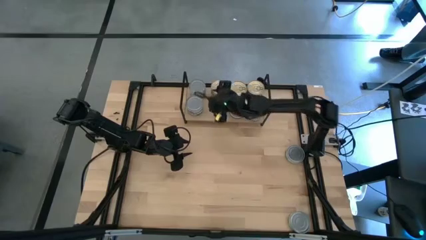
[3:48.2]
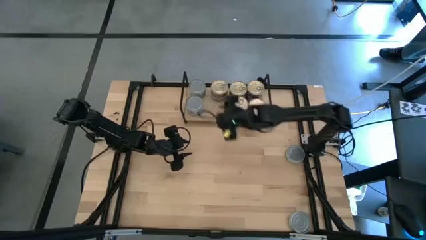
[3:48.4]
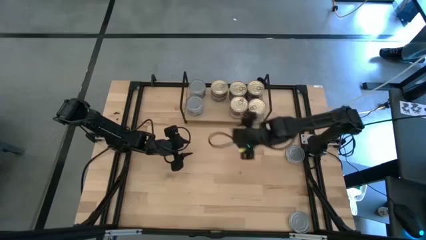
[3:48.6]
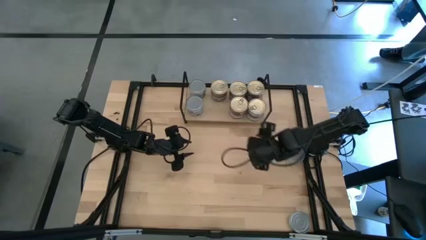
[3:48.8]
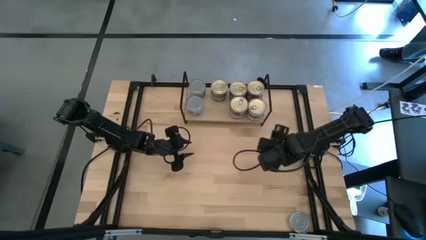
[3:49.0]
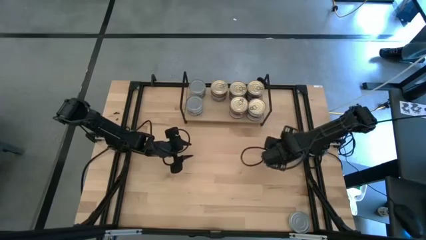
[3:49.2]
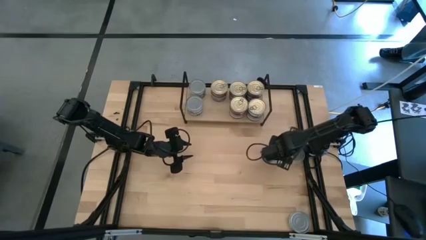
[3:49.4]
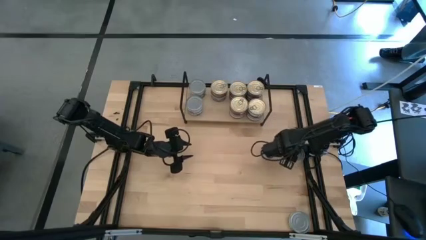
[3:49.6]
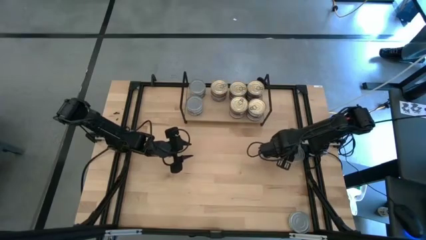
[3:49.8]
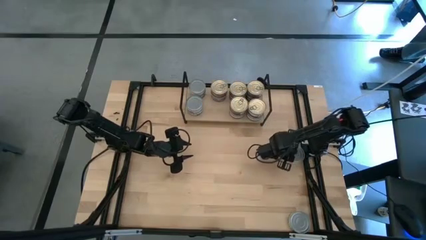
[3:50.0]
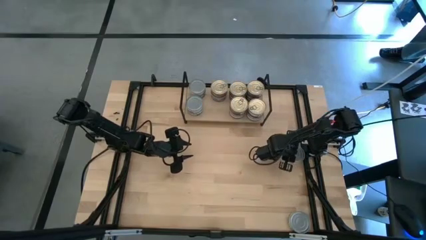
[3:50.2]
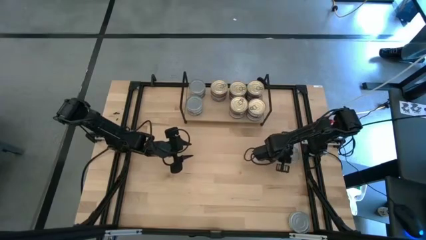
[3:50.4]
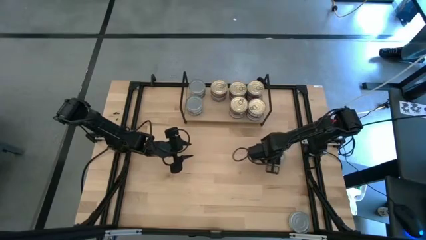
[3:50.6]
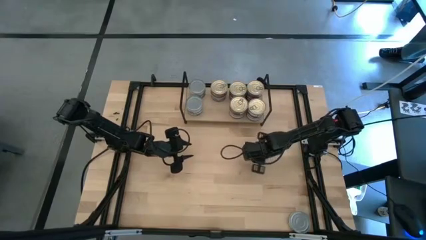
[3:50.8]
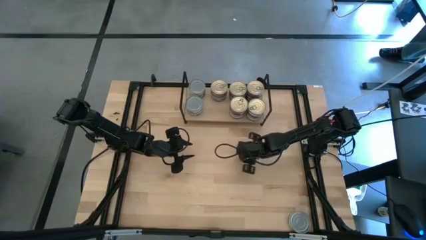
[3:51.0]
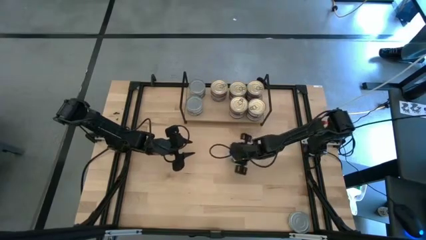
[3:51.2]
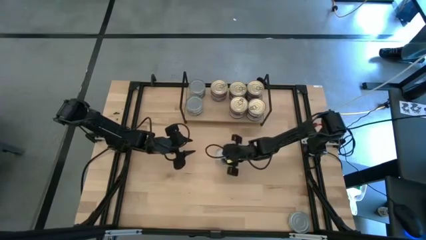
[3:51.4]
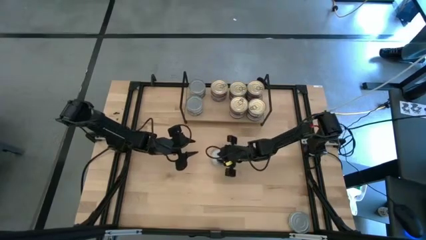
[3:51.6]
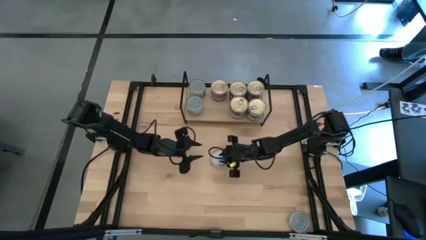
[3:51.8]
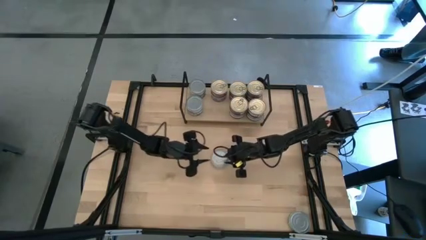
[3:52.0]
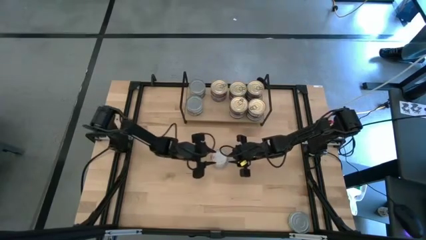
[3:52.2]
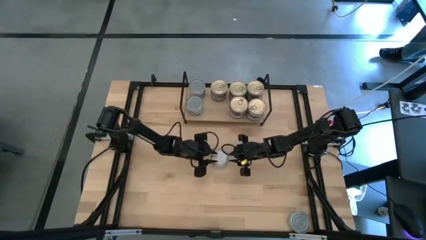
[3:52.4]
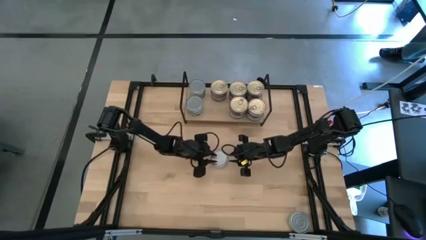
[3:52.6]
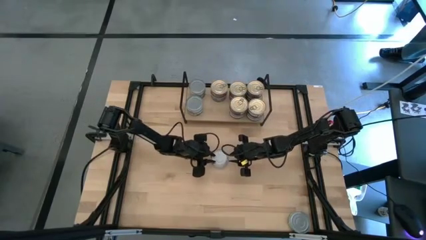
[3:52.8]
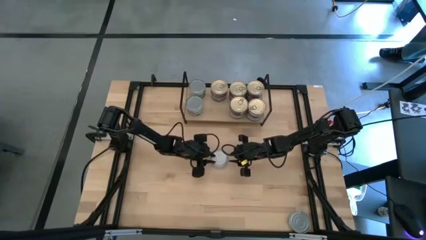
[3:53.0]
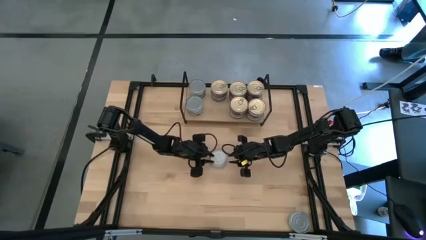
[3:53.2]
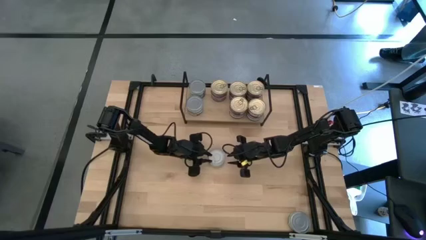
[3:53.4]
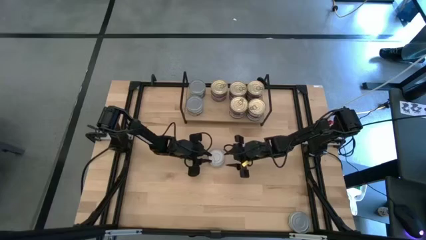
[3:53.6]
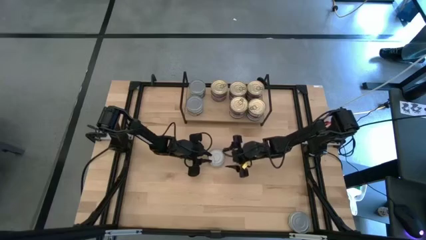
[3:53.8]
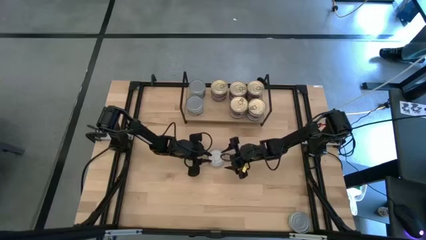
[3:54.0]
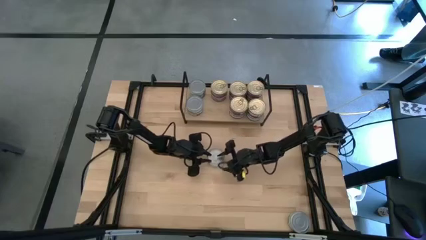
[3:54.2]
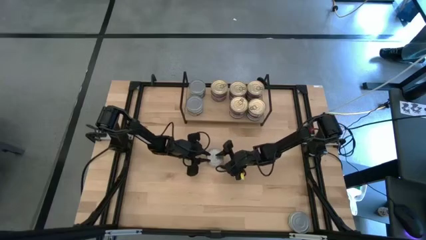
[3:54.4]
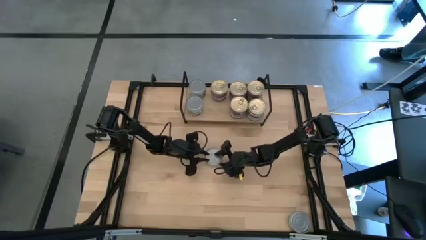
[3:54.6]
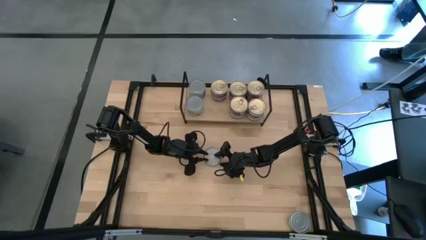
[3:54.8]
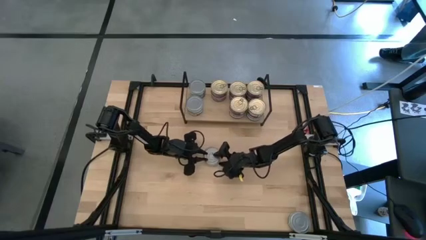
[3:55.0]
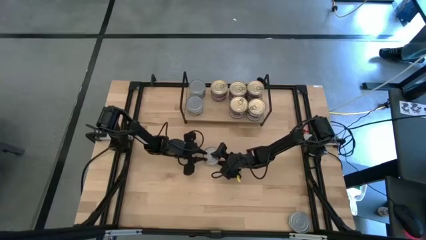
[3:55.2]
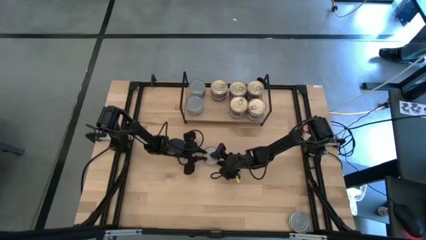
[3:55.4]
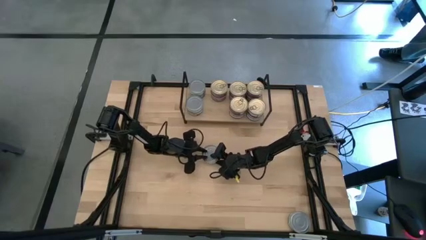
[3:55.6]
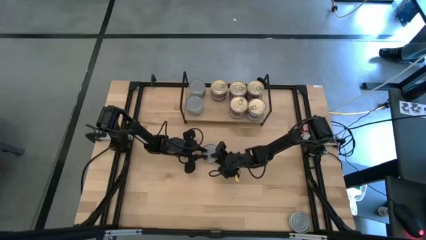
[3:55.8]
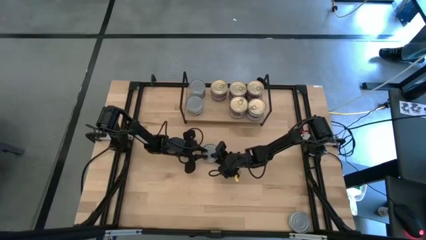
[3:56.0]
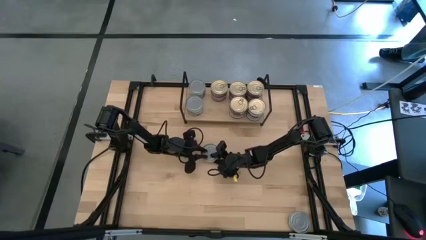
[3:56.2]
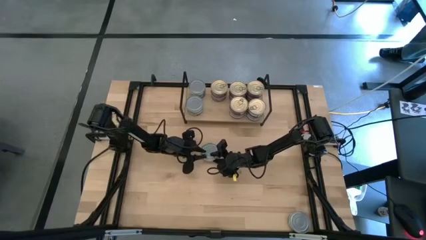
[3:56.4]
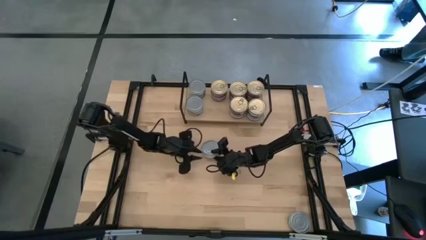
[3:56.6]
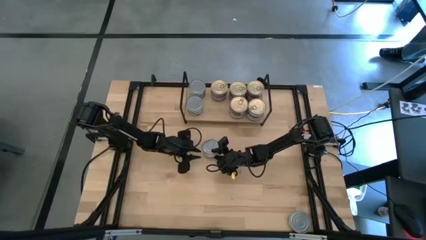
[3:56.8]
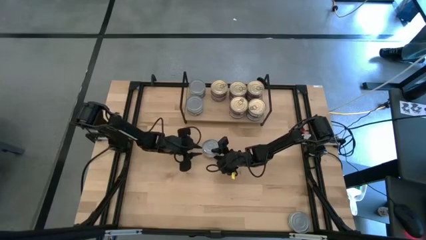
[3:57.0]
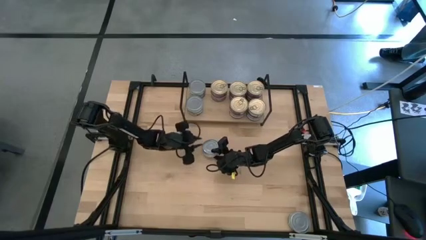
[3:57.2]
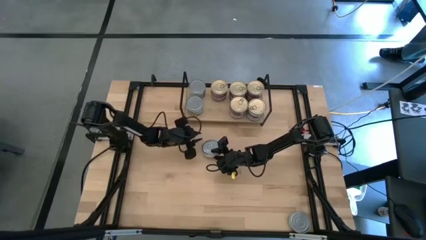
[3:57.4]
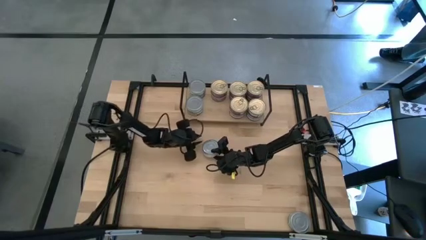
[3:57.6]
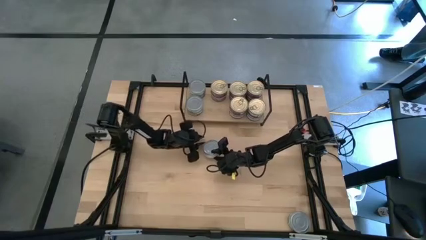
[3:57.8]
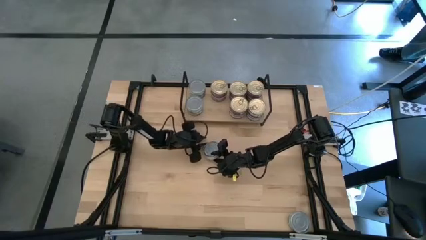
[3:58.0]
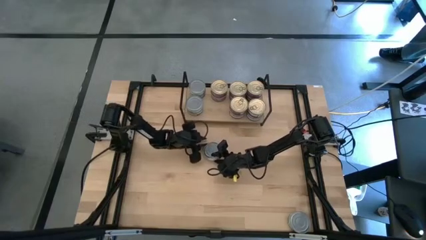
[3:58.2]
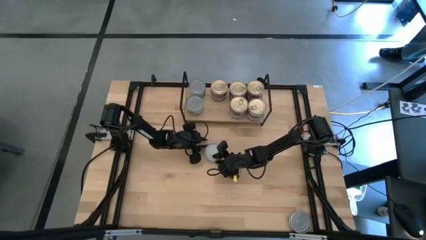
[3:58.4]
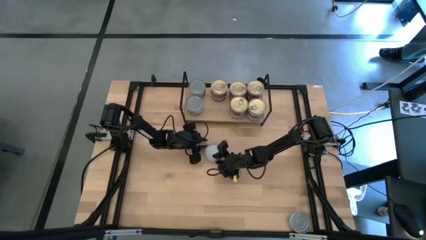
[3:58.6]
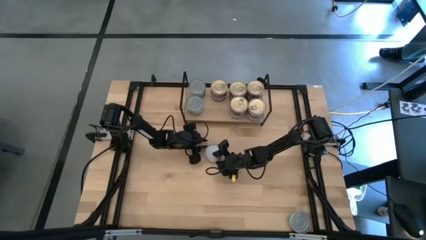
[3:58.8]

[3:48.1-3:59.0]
Task: Stack canned seafood by type on shelf
Put the green white tuna can on the shelf

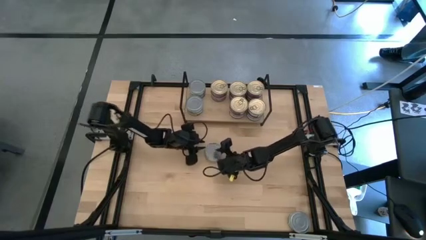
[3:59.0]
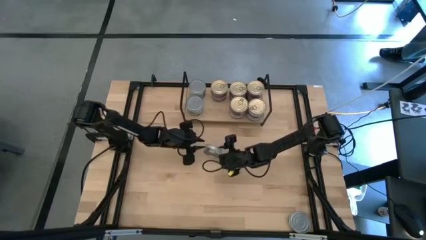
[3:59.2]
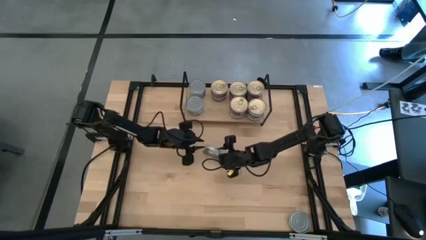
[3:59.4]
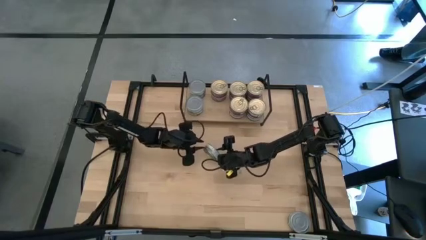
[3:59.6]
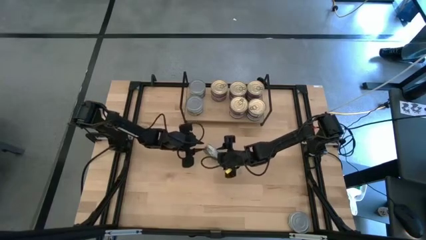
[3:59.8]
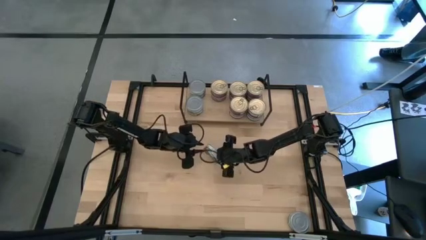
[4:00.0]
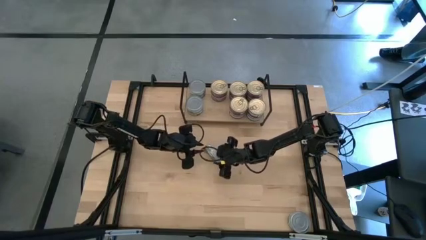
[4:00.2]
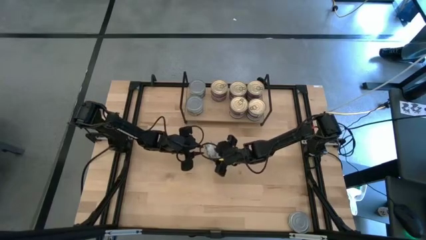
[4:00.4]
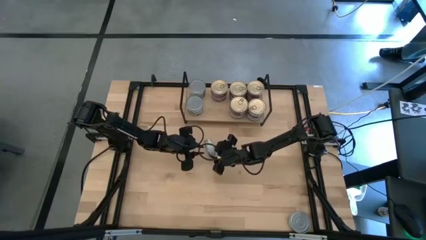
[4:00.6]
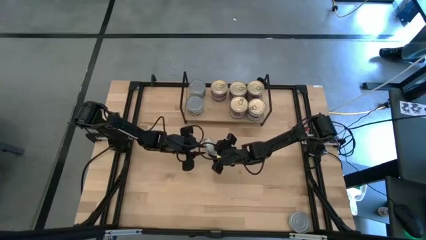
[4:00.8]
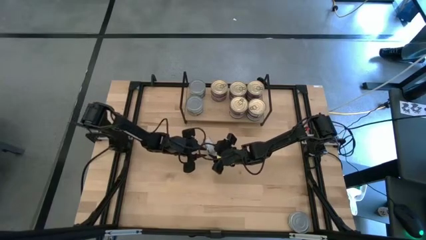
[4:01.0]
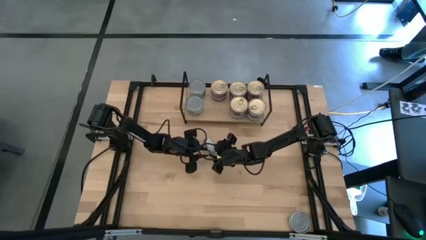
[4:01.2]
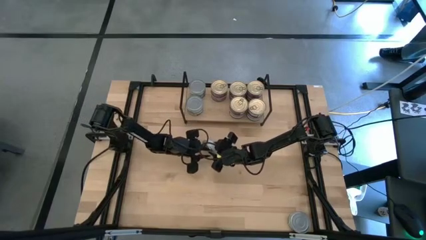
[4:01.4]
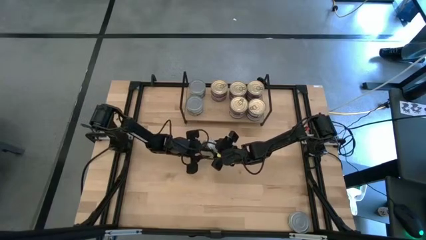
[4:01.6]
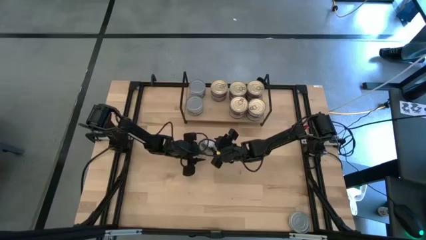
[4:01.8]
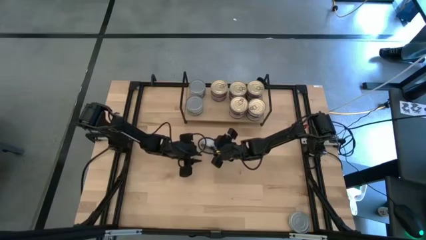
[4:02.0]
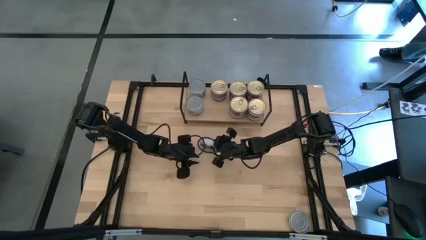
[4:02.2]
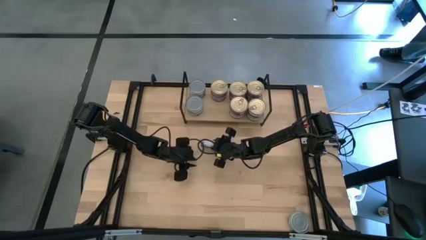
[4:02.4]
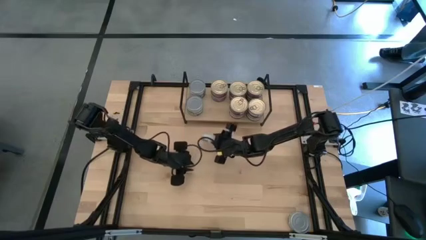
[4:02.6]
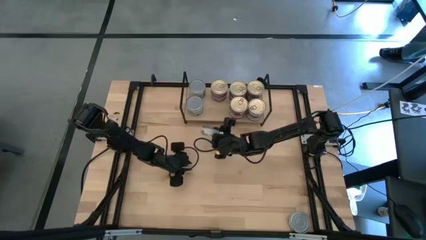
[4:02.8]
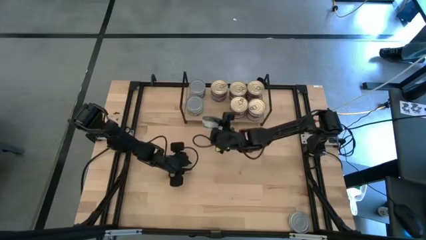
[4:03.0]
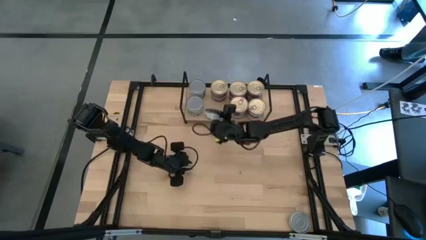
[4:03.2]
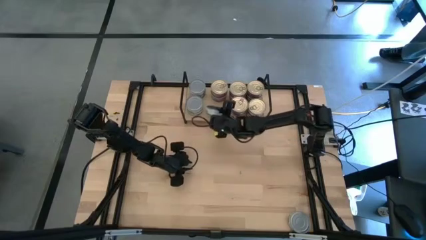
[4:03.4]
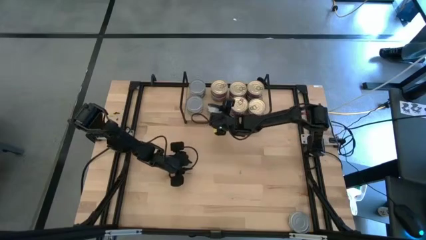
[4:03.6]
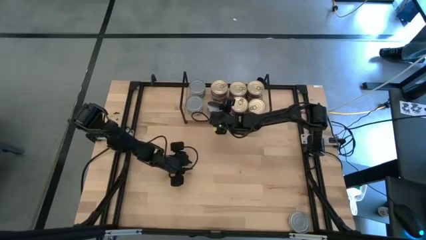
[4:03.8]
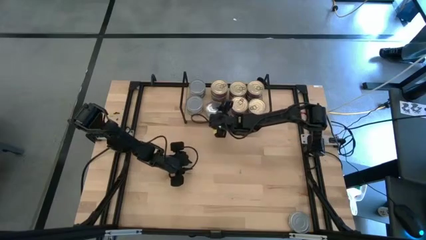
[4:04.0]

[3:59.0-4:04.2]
Put the green white tuna can on the shelf

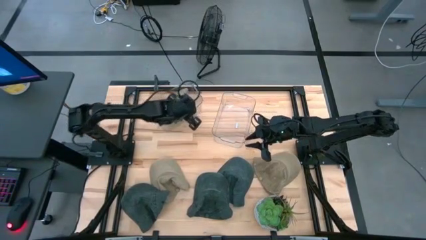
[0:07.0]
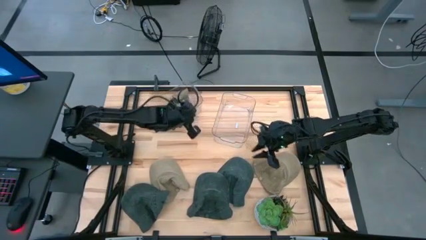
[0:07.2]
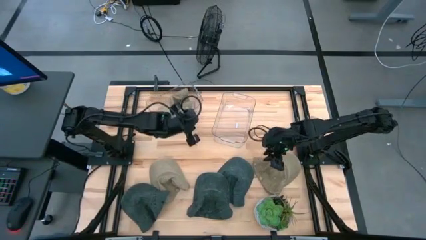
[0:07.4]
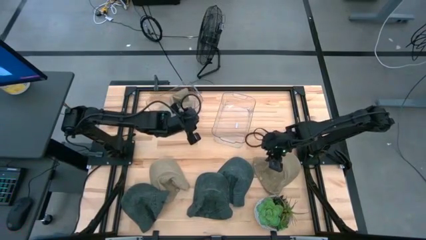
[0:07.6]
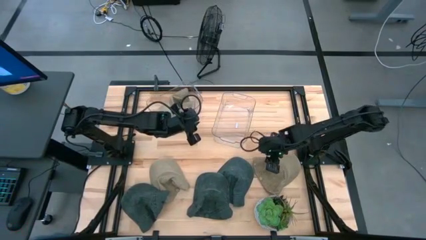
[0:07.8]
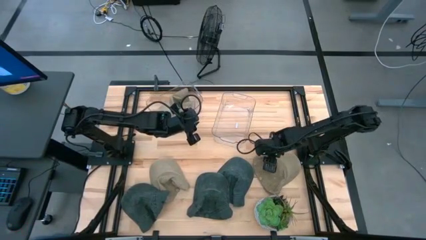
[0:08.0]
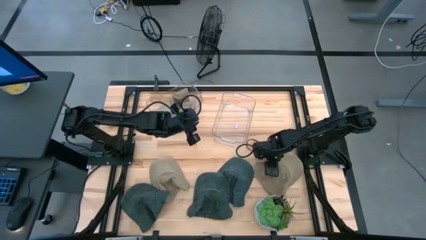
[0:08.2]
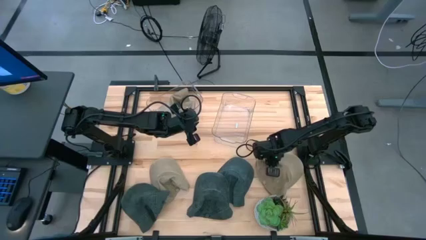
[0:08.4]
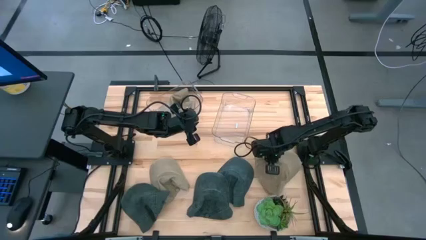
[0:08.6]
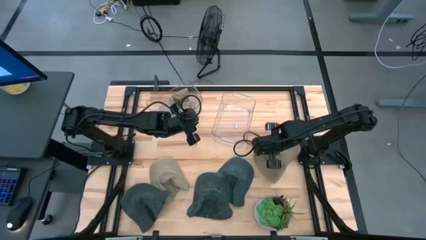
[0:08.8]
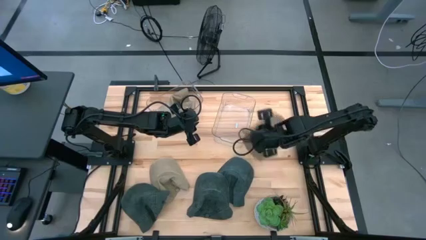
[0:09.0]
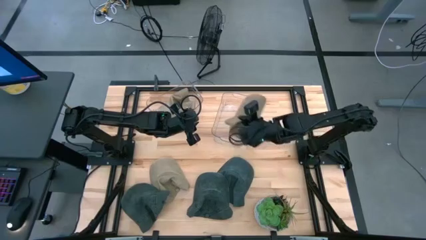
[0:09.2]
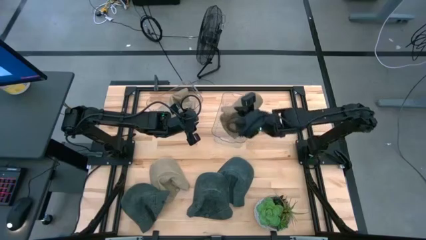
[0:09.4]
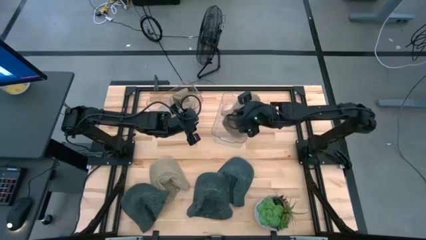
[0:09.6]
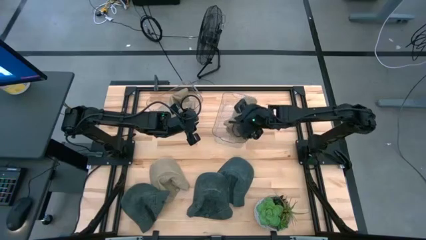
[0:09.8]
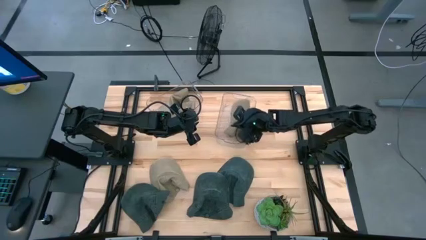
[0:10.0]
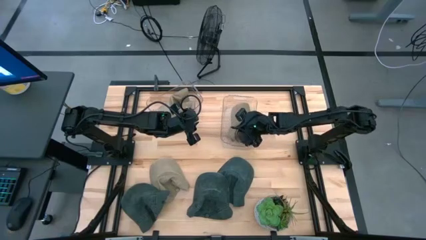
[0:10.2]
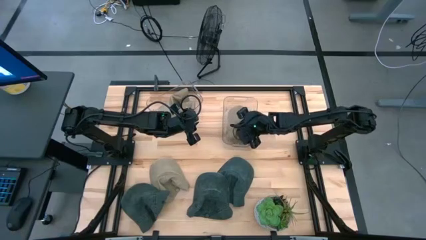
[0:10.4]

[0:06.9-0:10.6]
Task: Pick & Place hat
Put the right brown cap into the left transparent bin
